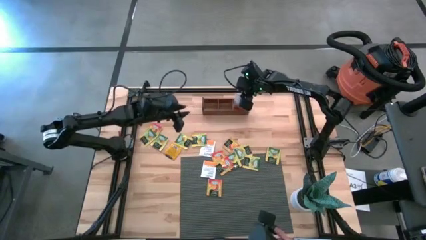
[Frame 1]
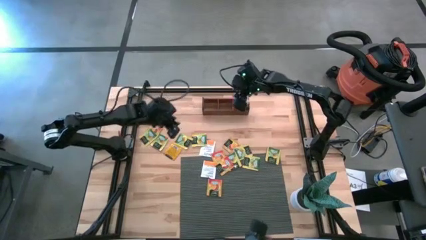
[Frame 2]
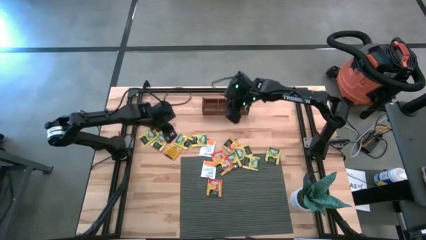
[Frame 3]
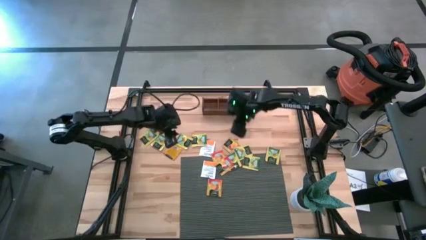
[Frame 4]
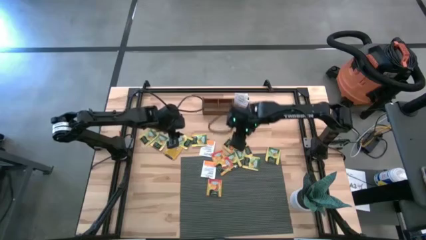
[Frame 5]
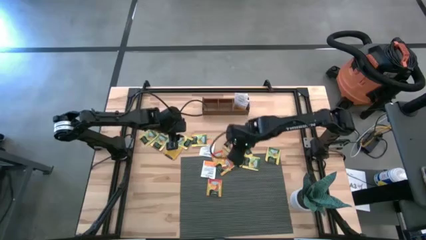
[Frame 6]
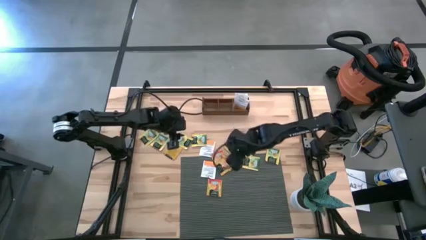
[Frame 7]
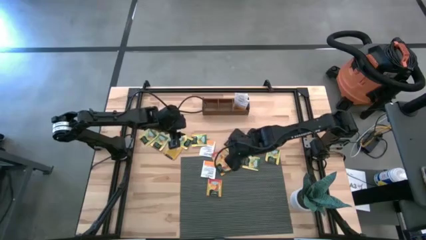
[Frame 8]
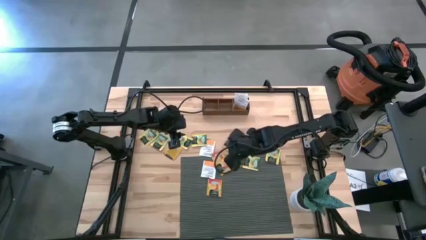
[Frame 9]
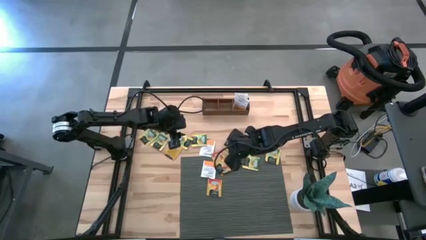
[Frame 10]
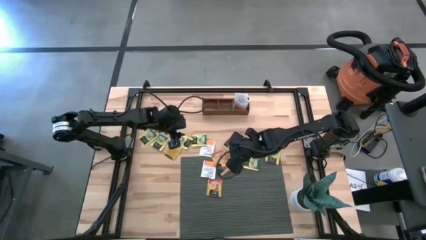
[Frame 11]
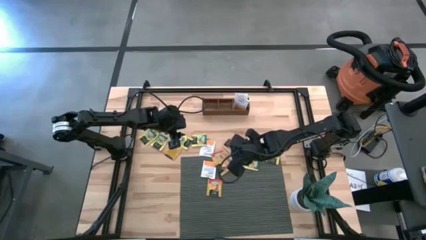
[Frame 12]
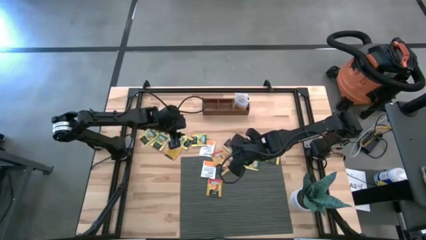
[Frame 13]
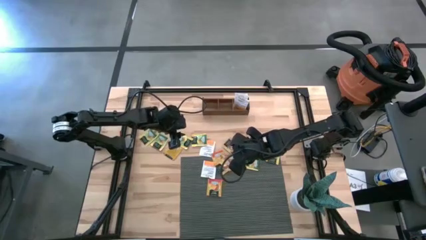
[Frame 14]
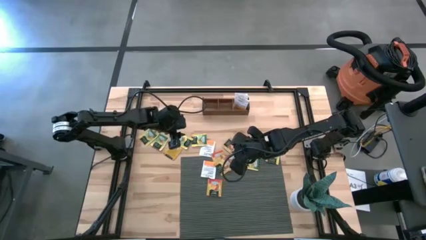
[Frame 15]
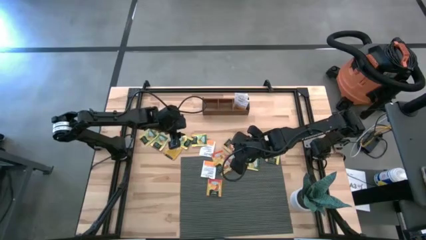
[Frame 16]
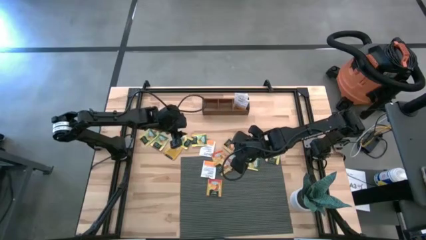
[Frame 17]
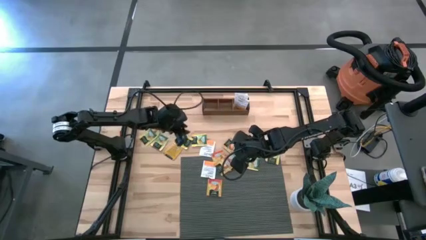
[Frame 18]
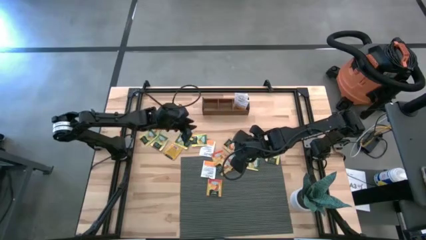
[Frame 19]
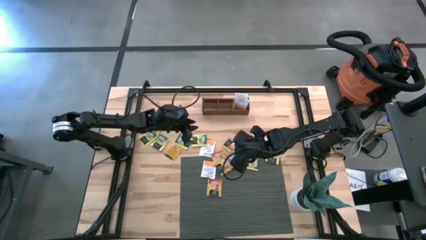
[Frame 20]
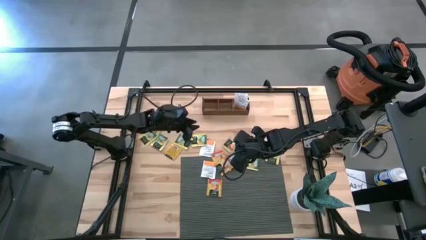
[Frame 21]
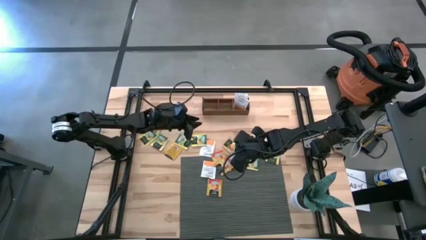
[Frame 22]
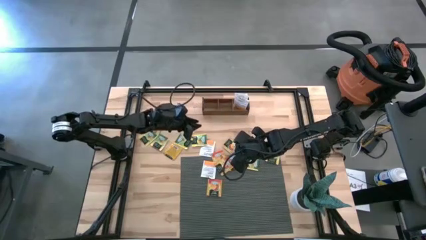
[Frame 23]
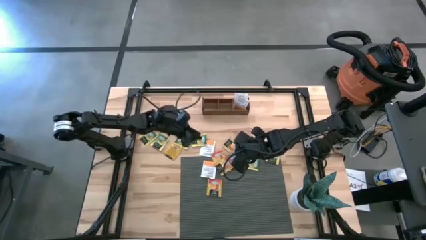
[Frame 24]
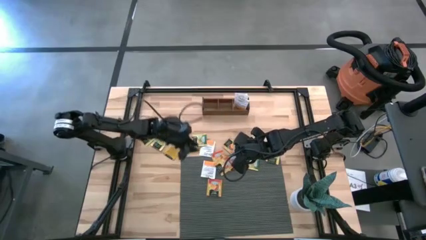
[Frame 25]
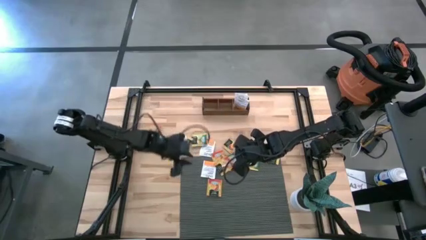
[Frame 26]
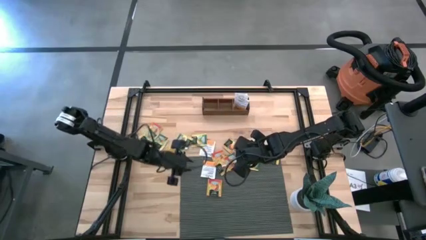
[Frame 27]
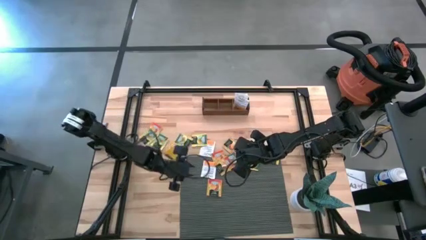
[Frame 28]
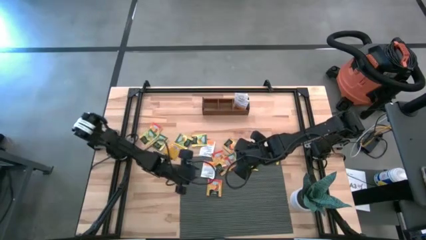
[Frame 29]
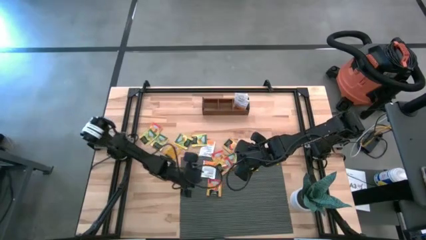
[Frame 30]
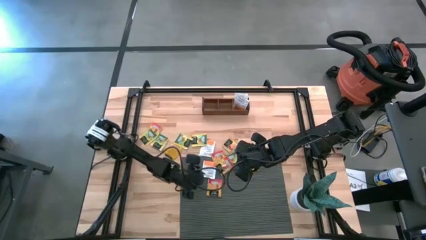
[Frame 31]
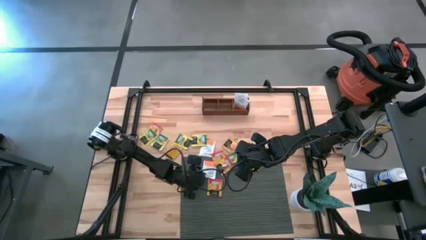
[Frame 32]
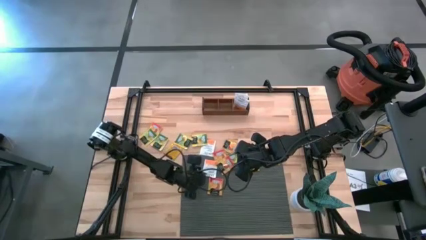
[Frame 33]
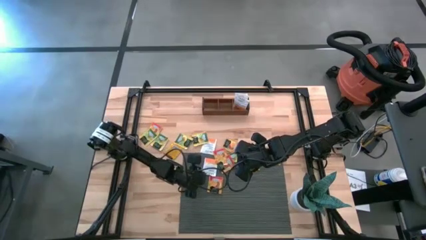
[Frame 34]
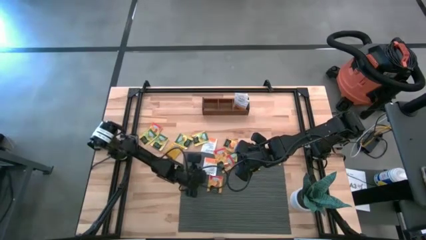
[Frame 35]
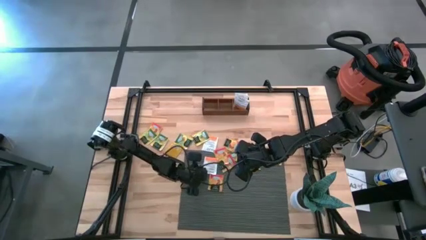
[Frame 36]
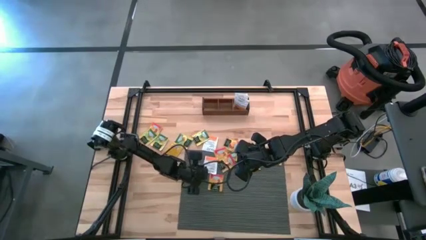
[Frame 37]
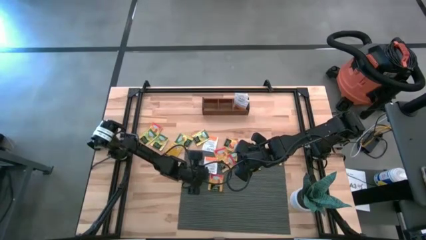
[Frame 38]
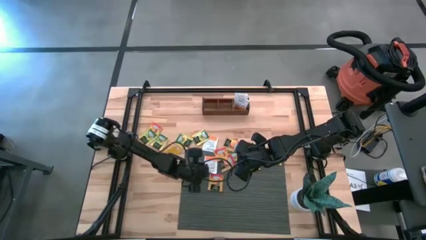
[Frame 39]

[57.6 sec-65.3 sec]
Task: Pick & Place Tea
Put the white tea bag into the right section of the wooden organizer

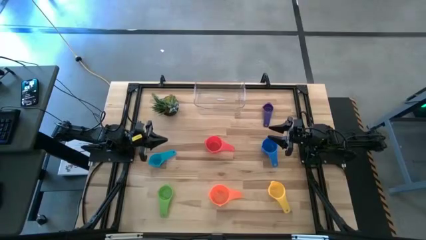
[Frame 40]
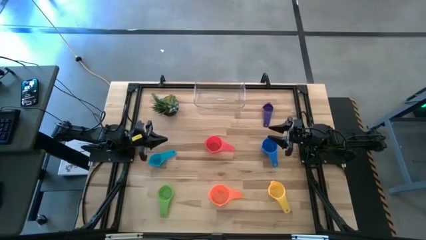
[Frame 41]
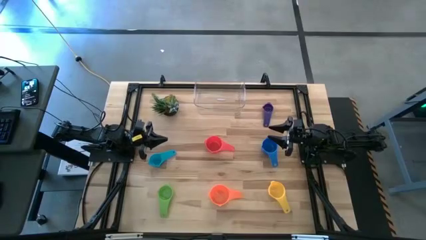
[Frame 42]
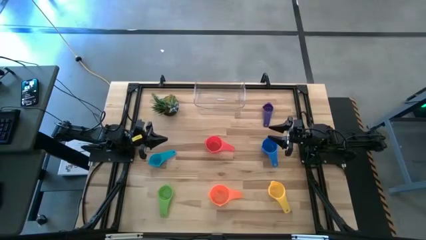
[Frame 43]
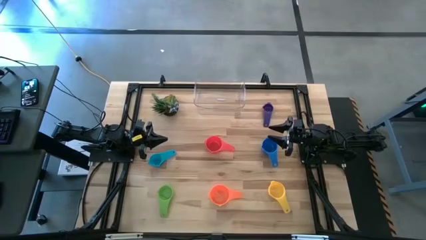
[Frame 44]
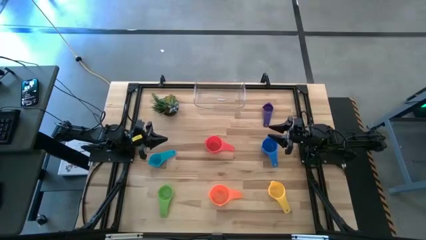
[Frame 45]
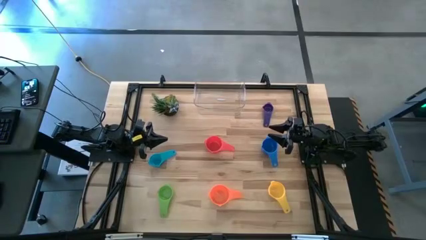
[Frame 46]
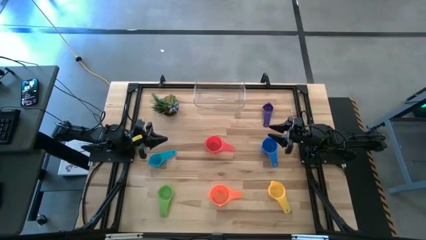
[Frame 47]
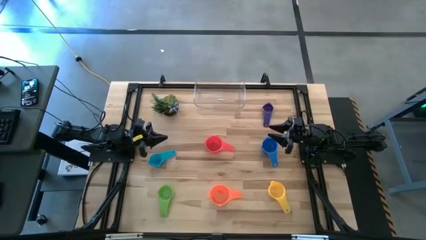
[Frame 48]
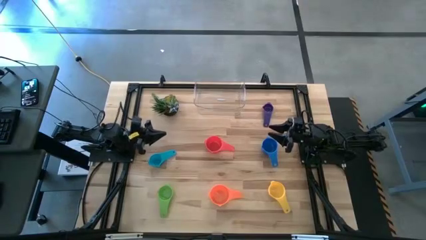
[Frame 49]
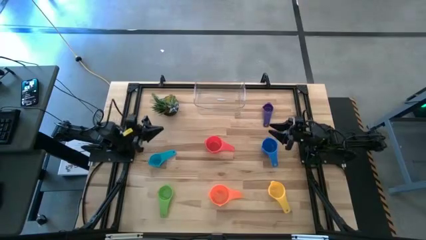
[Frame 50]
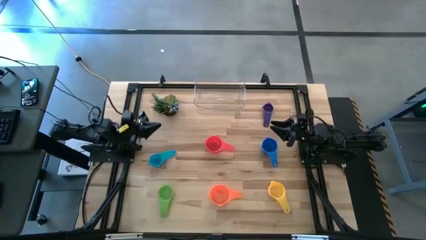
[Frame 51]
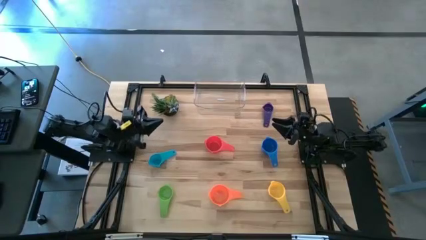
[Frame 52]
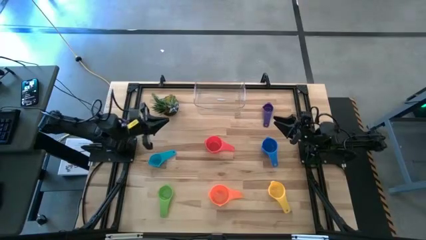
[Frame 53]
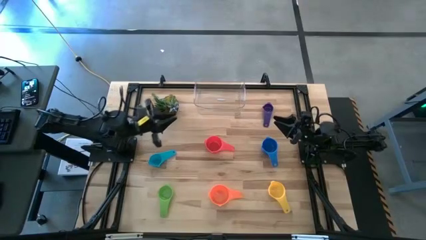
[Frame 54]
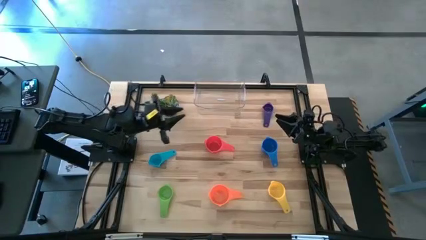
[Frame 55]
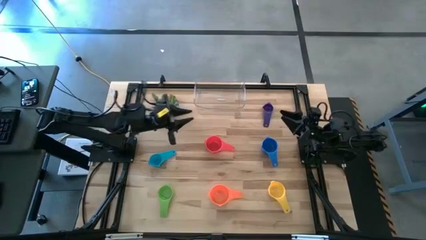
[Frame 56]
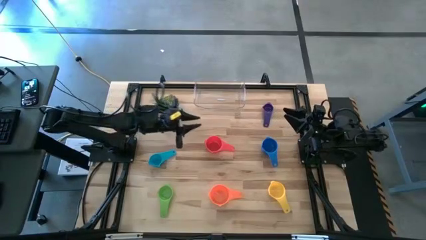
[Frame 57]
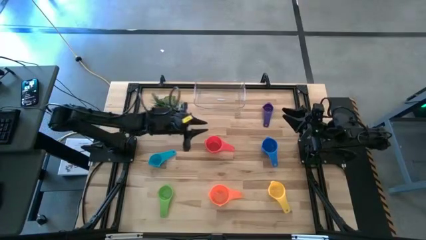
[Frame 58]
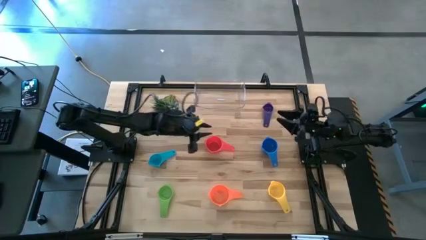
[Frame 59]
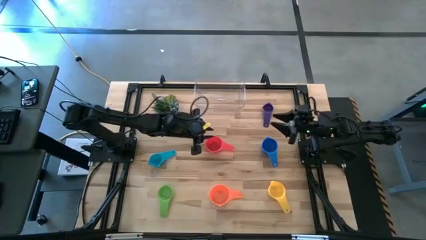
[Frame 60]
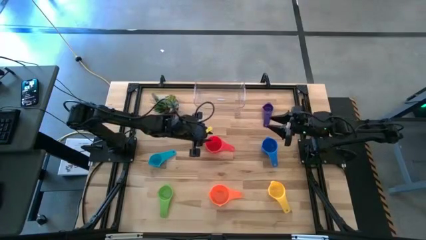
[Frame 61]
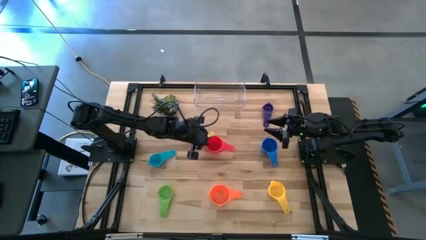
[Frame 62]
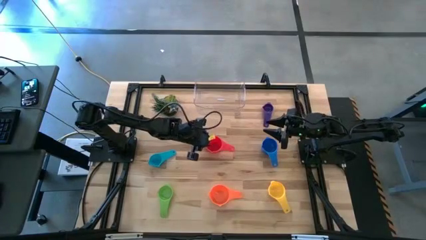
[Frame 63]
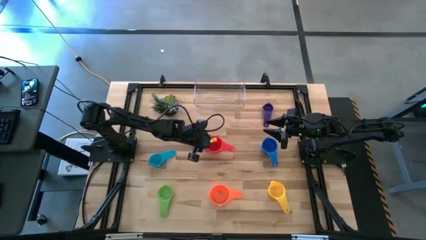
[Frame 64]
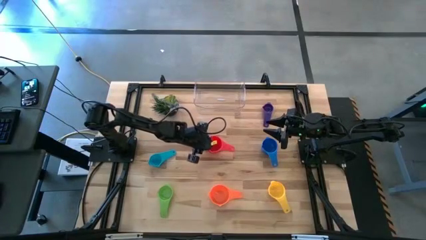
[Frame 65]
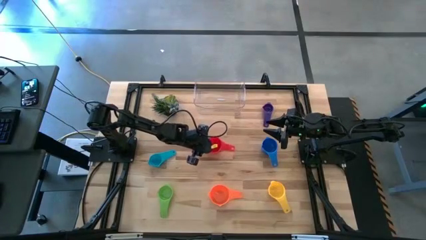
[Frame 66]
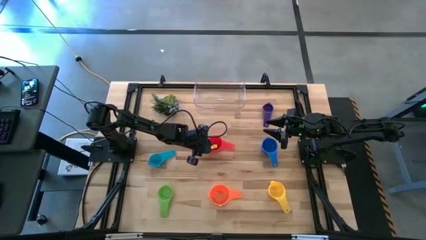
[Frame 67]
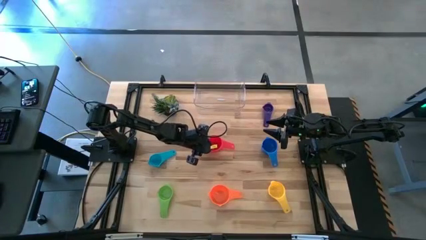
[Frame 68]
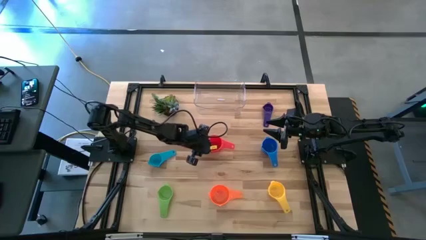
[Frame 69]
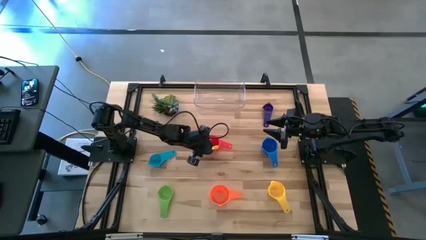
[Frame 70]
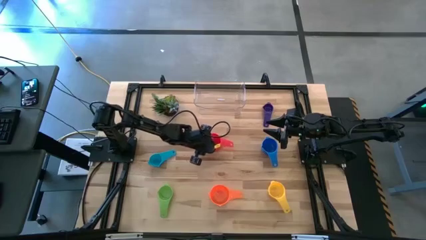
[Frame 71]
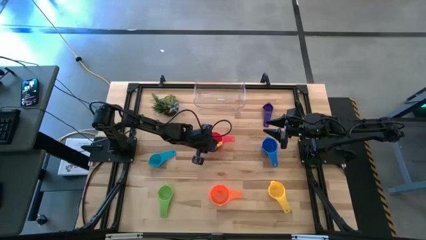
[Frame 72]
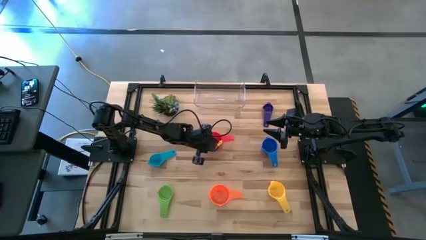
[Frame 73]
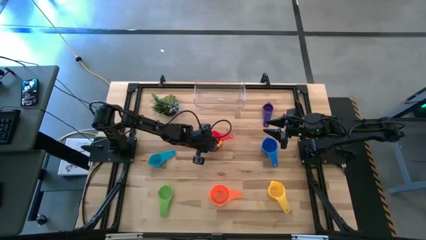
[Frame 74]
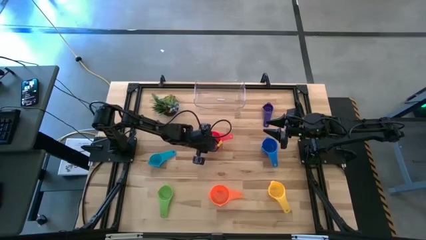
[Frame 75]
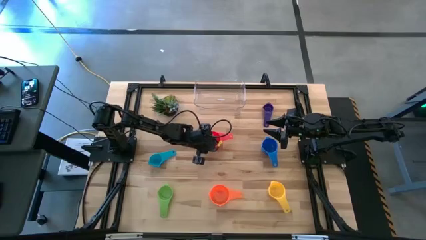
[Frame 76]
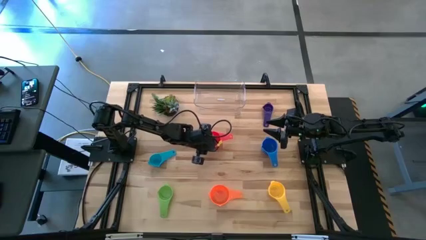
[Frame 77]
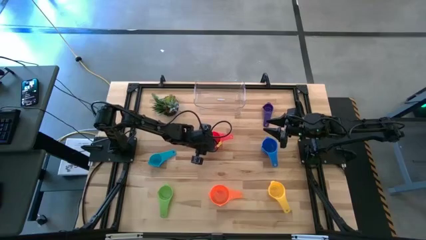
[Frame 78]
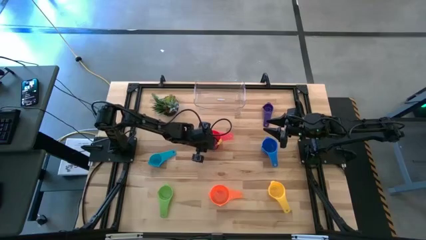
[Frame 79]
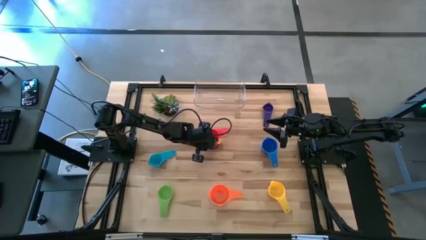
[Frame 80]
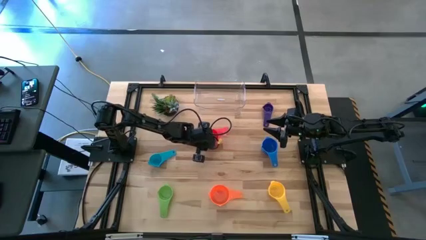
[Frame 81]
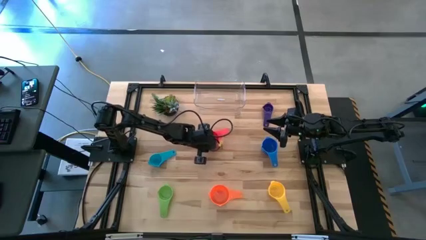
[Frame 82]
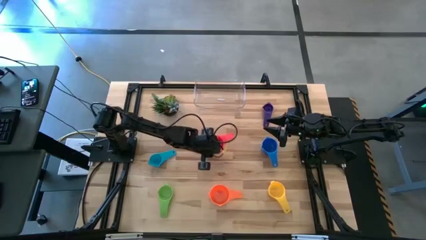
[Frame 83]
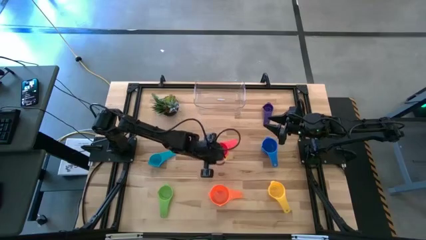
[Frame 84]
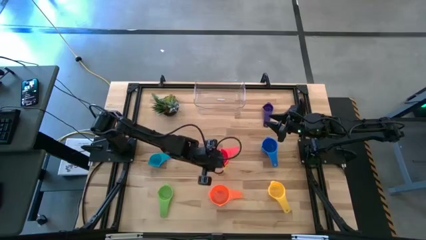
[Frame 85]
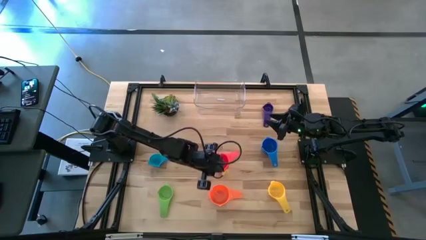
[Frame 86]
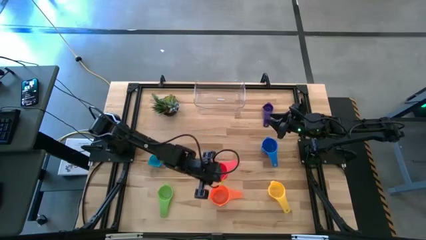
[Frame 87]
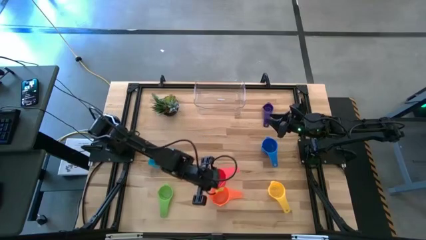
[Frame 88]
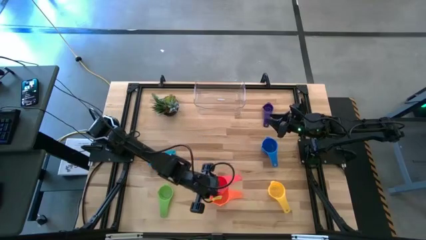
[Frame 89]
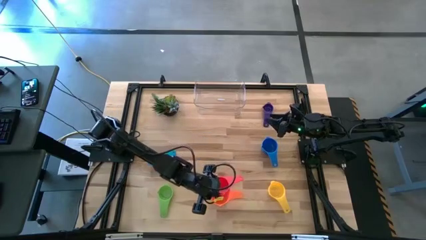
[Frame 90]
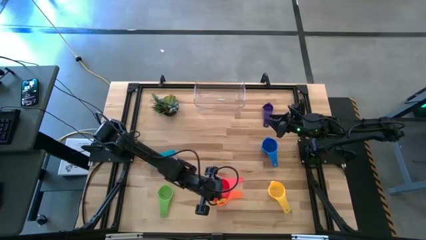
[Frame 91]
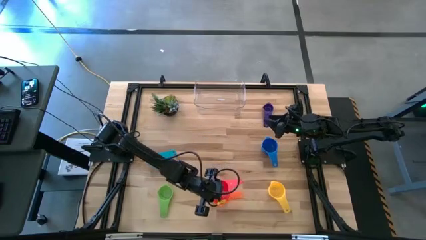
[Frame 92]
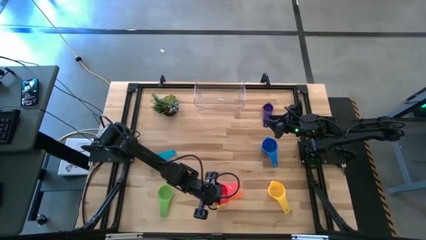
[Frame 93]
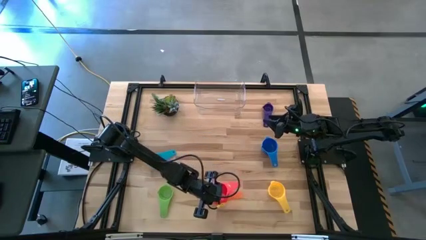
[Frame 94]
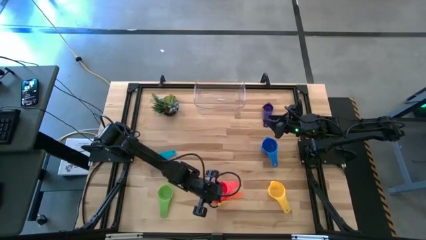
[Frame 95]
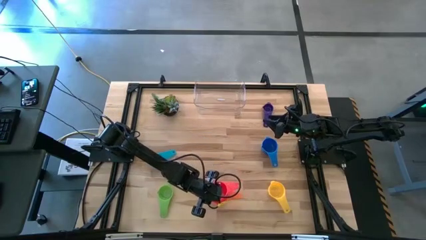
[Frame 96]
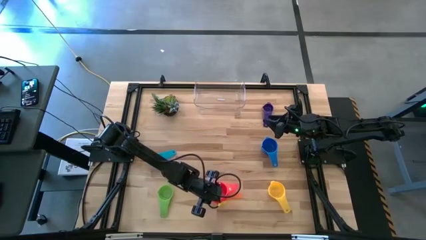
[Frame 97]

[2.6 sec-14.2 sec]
Task: Nest measuring cups in basket
Stack the red measuring cup on the orange measuring cup
